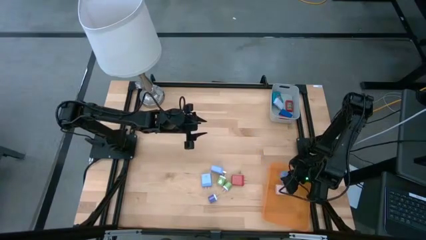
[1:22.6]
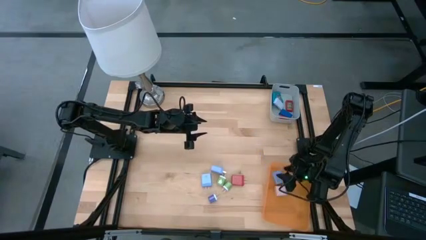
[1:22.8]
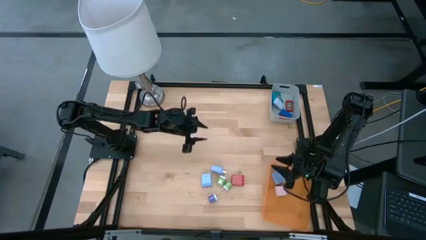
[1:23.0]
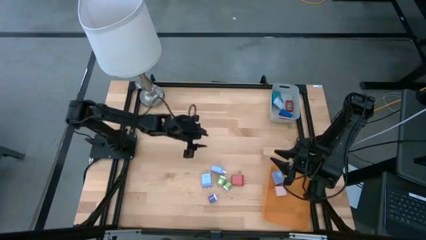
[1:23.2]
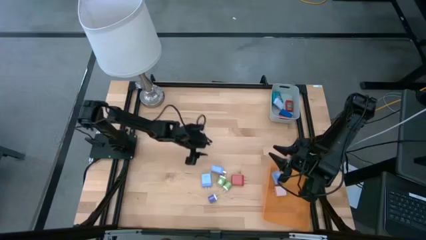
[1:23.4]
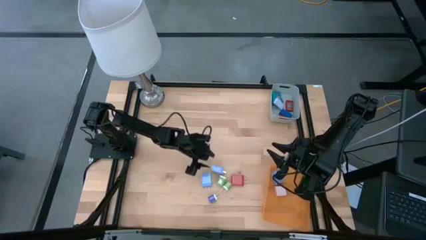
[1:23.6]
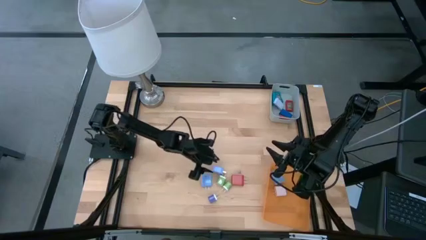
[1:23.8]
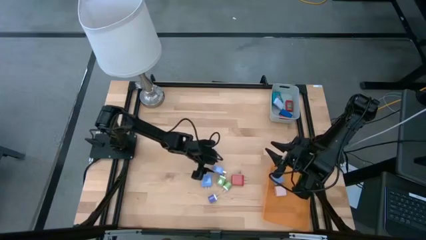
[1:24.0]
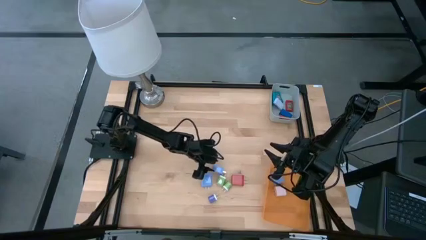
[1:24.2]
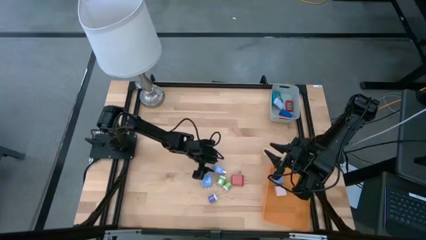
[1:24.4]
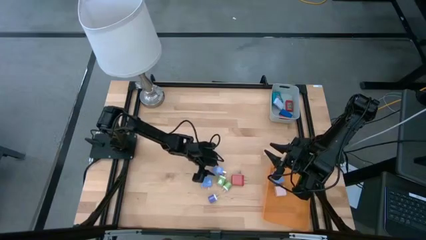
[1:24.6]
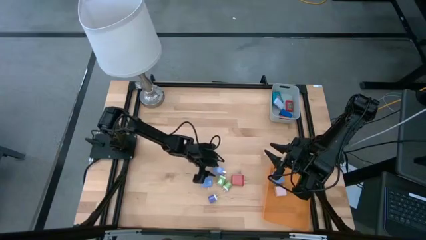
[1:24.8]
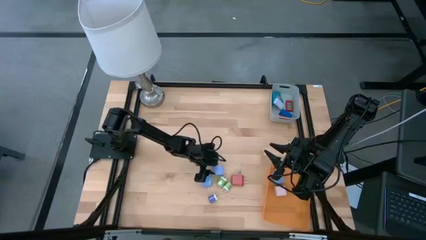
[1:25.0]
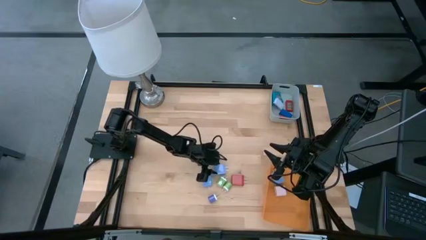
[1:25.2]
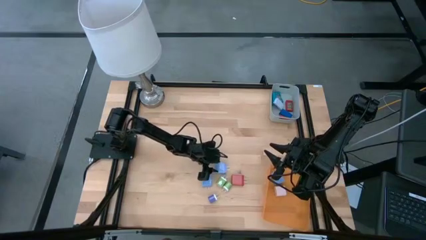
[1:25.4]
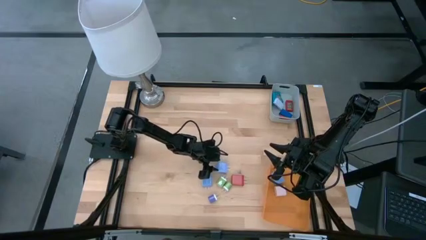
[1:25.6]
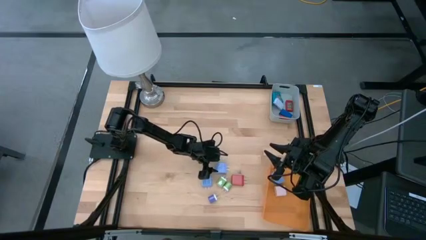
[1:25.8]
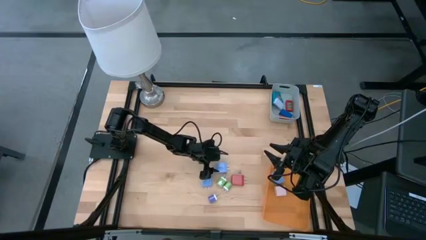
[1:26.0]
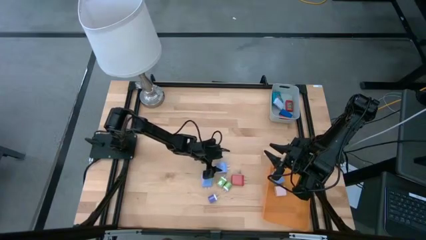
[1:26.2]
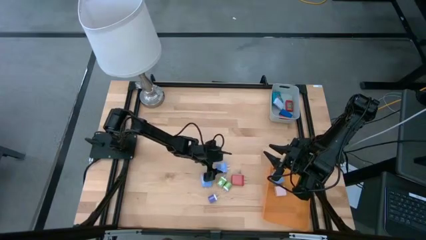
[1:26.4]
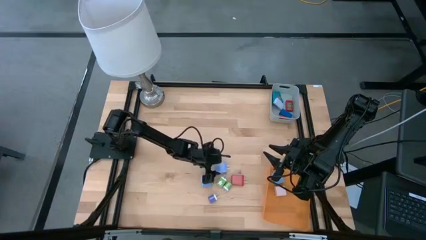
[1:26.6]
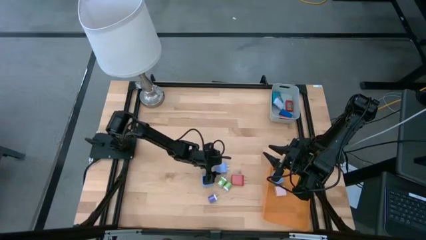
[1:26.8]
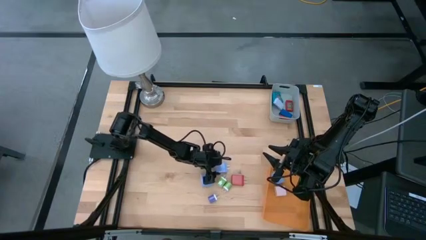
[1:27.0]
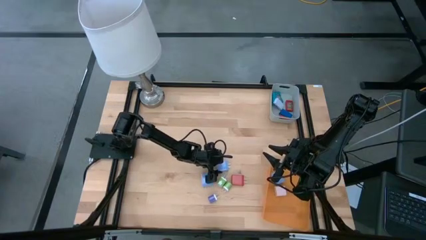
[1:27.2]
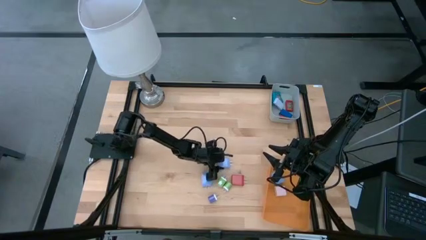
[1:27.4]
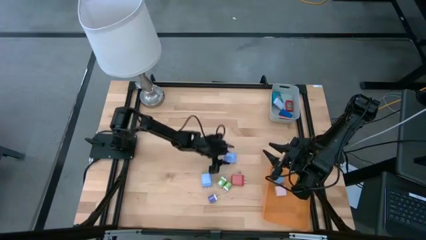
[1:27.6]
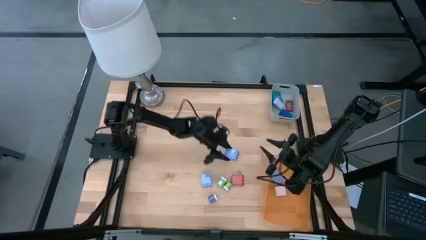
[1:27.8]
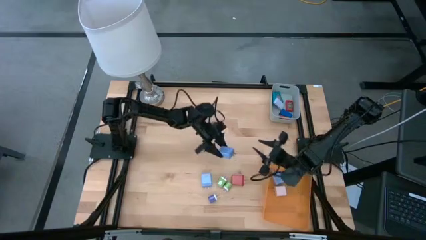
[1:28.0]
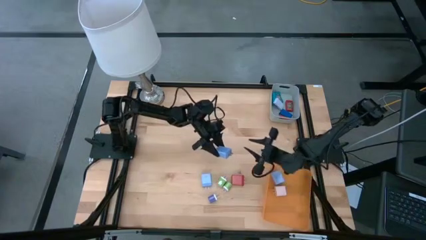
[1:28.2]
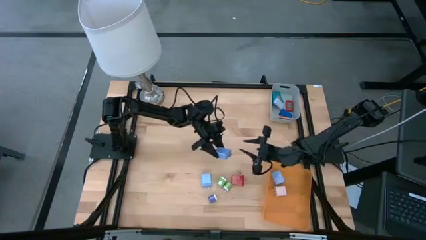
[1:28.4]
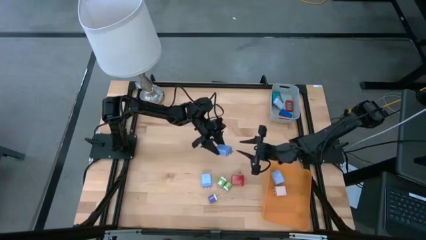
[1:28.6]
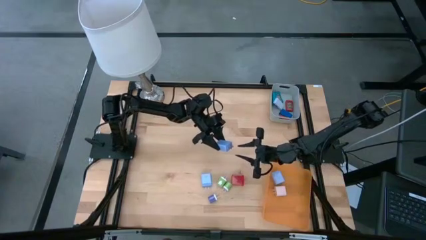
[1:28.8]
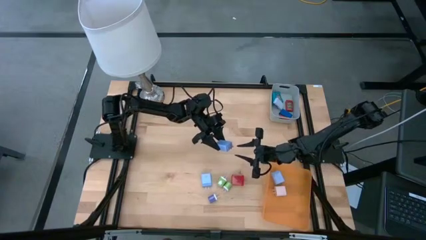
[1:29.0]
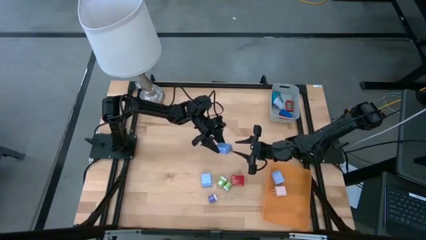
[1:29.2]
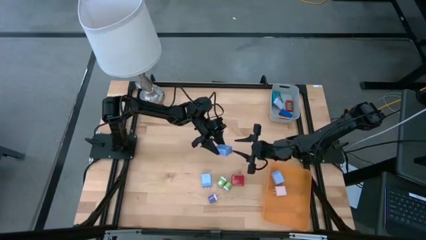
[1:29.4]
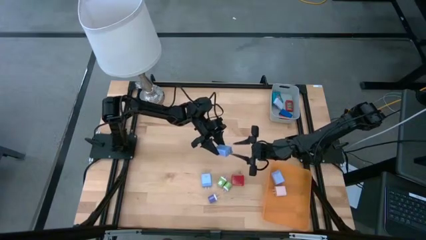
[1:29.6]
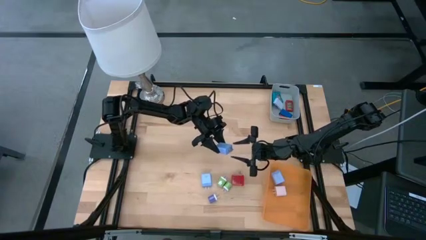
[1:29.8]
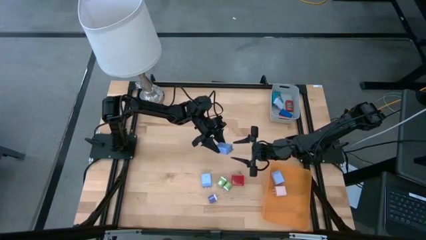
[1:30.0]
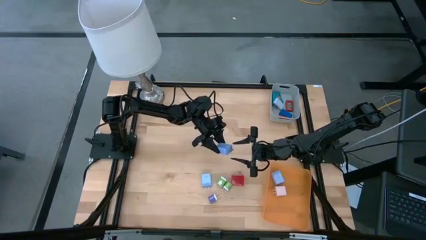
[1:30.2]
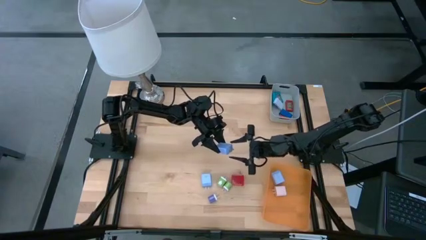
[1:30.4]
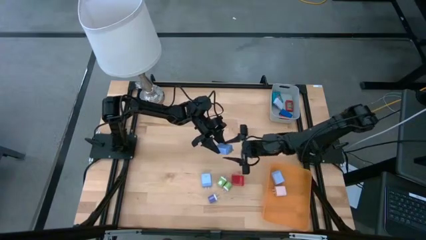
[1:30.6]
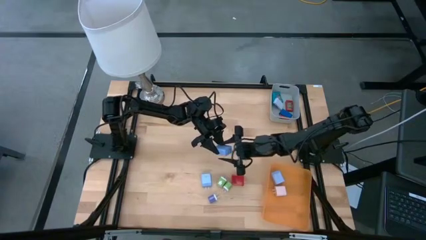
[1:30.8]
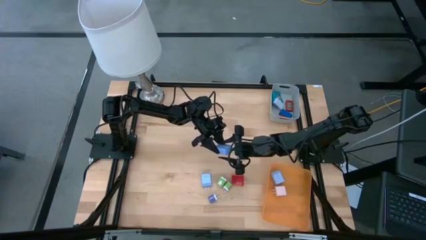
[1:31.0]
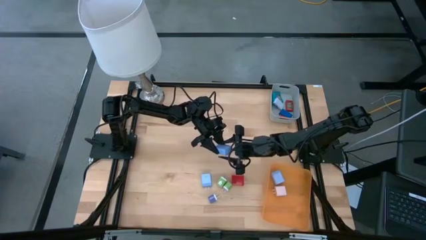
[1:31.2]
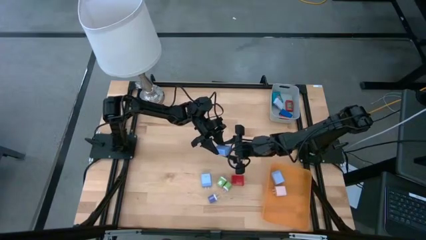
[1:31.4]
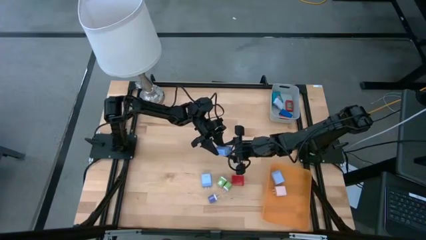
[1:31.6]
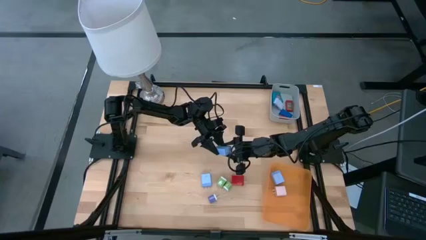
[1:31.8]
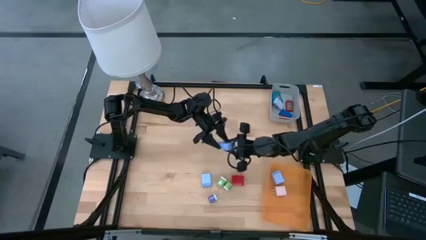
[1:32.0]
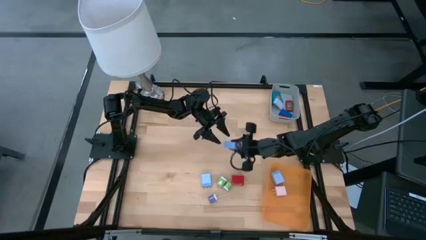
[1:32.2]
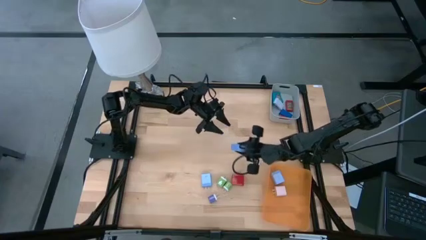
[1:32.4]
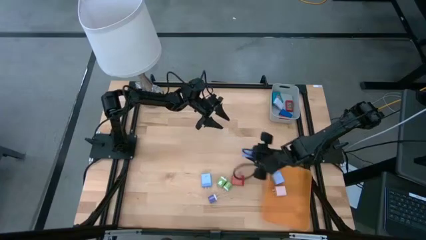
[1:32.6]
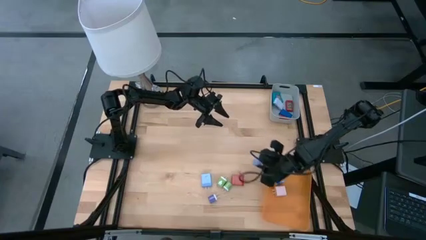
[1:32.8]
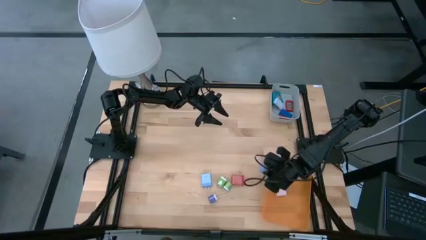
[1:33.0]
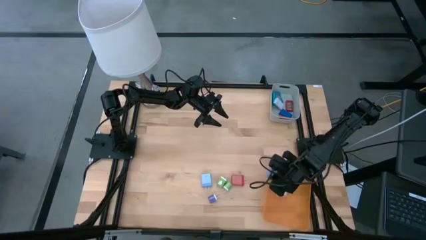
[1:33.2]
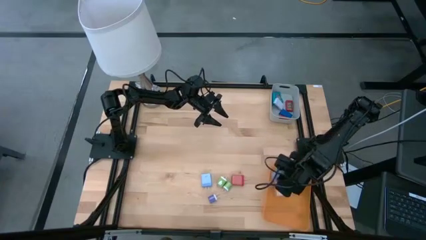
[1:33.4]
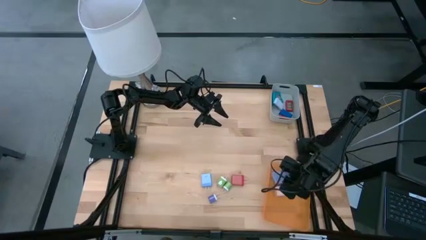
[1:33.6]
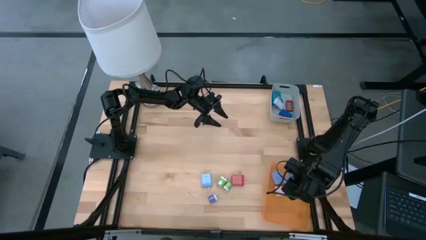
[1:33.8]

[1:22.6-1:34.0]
Task: Pick & Place Office items
Put the top light blue charger adapter into the orange bin

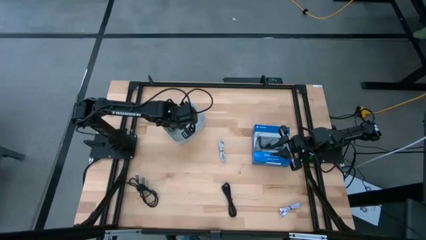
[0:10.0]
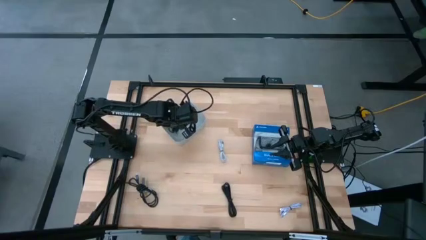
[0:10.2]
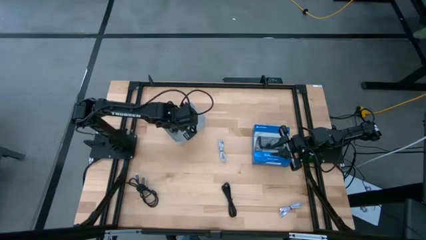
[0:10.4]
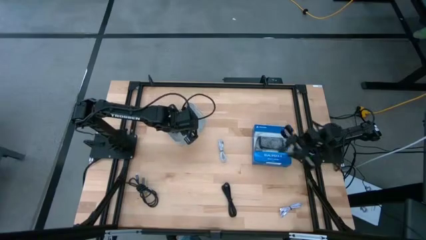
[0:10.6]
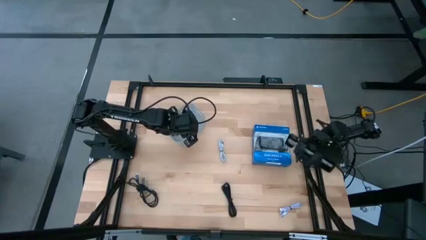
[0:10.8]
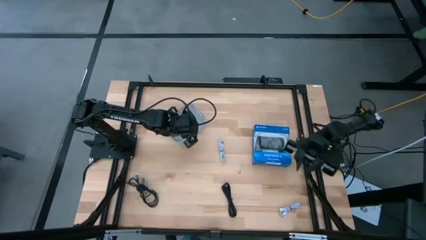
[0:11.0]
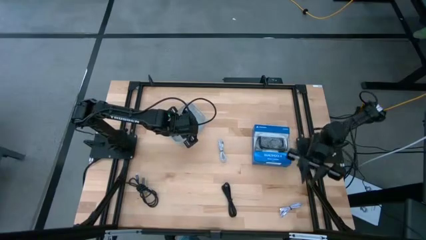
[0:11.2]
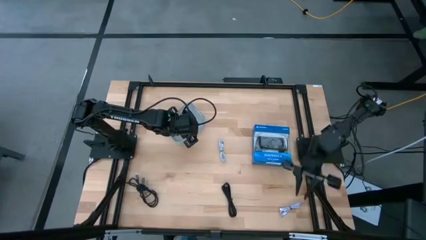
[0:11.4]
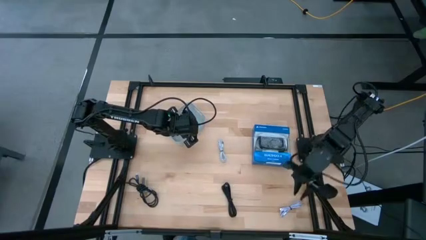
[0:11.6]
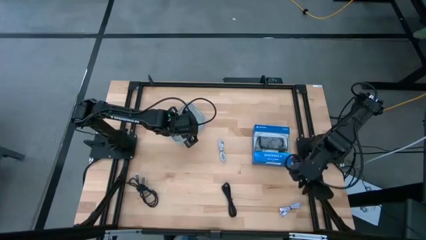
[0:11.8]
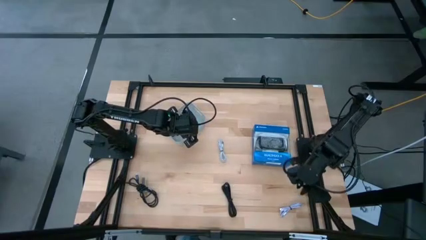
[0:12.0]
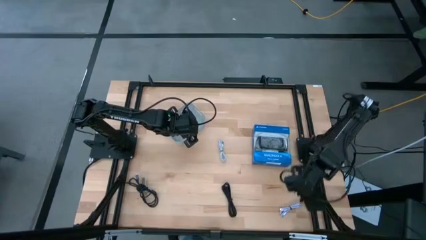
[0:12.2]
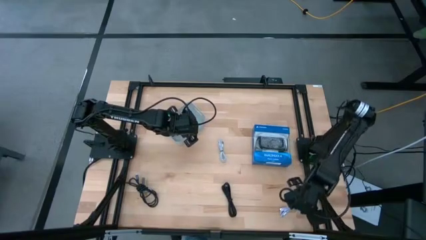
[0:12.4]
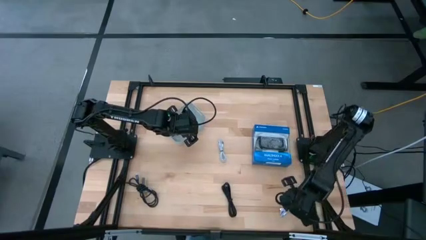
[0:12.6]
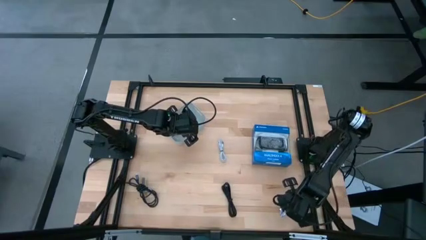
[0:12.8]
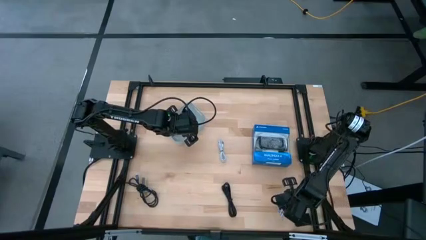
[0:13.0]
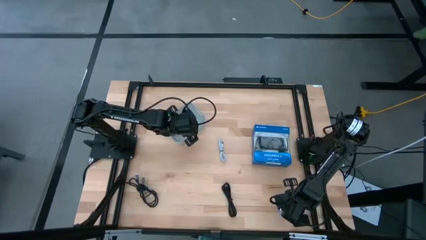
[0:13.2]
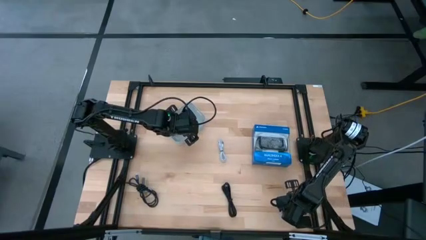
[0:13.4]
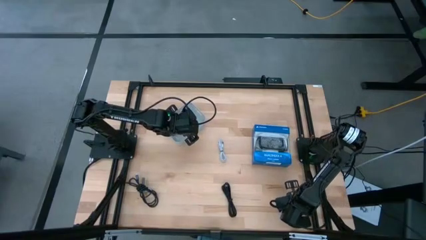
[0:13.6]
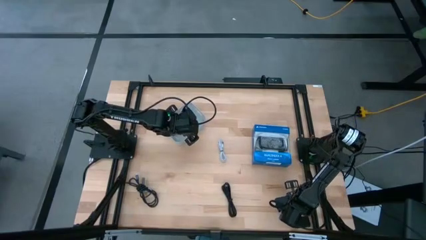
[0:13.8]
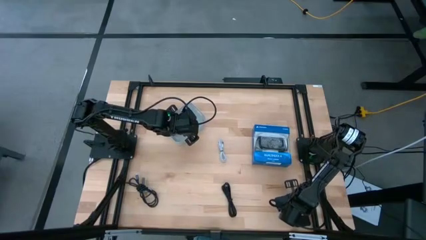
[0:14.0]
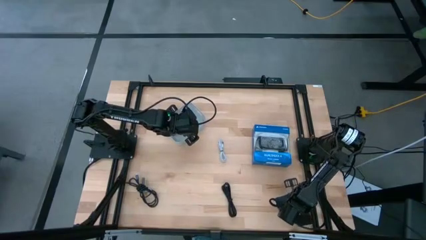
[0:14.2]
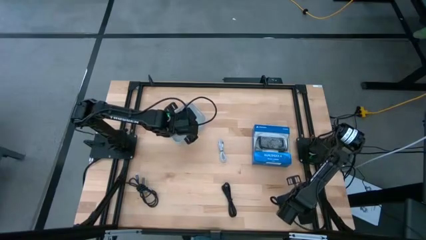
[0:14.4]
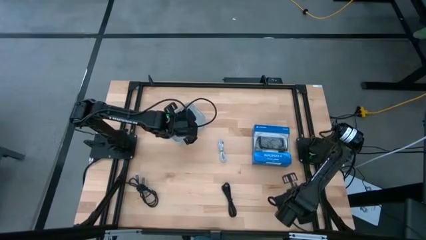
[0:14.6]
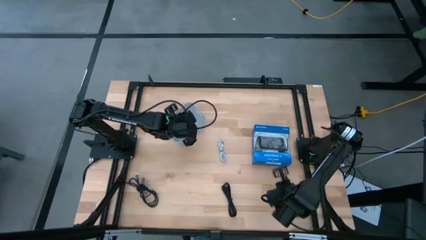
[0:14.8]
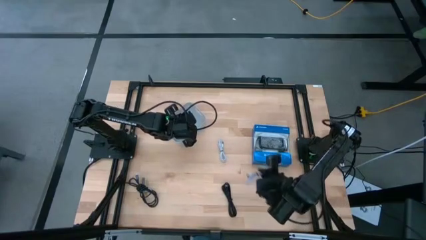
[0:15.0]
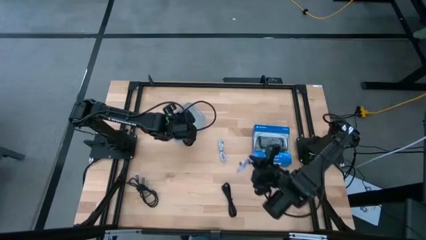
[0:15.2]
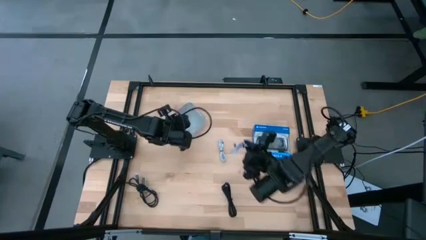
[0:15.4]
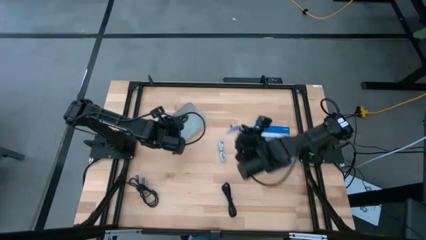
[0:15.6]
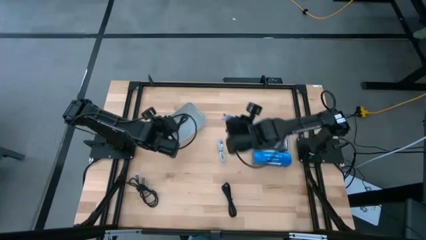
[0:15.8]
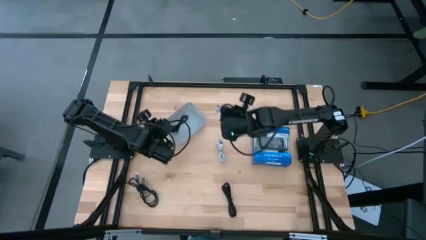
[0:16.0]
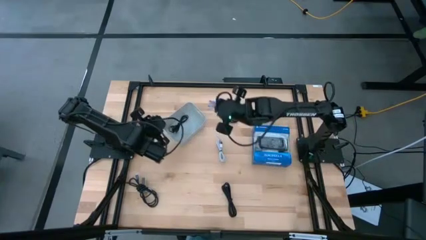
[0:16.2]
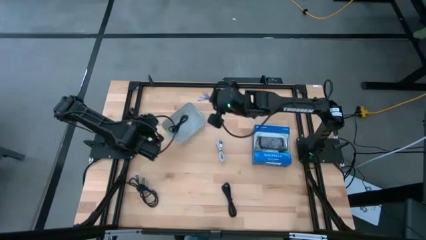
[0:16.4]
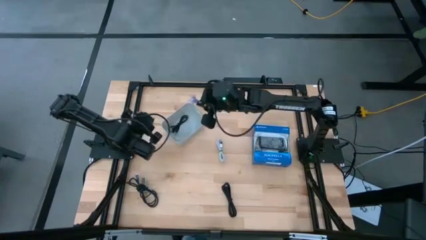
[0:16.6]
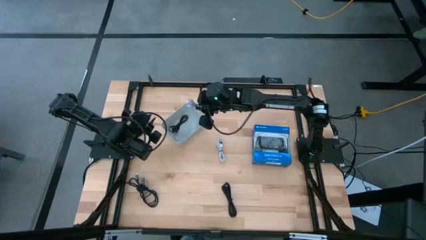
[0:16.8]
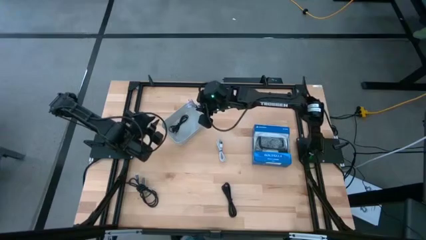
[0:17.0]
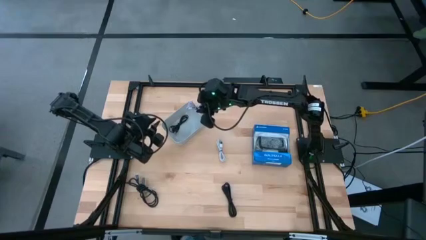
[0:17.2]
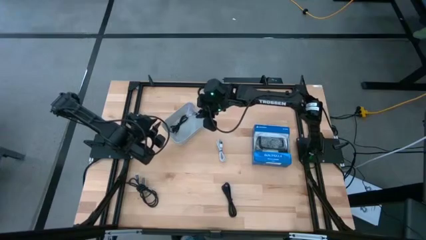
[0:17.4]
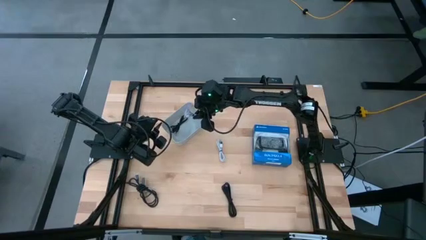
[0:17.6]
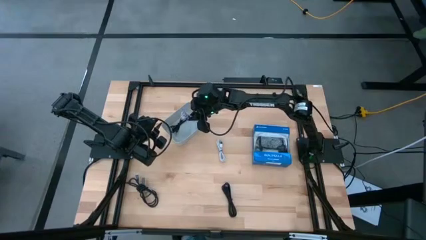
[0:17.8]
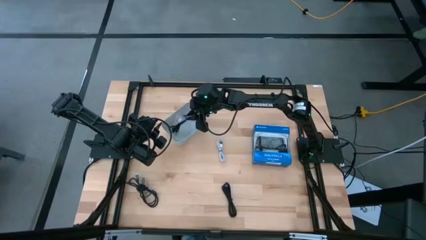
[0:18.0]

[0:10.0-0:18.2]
Task: Pick and place USB-C Cables
Put the light blue charger cable into the white bin
